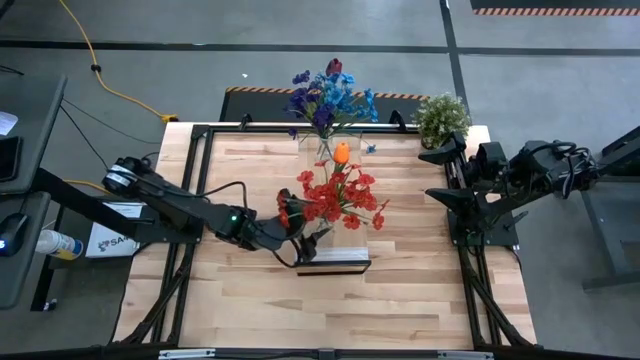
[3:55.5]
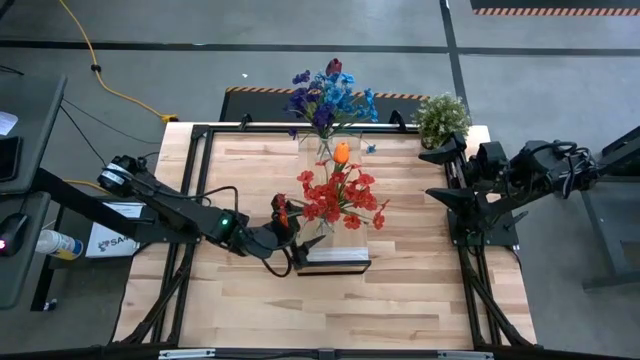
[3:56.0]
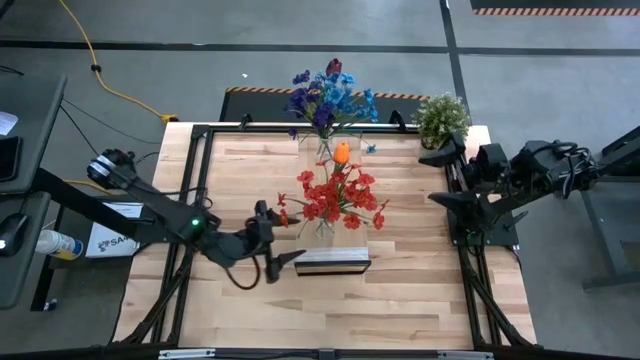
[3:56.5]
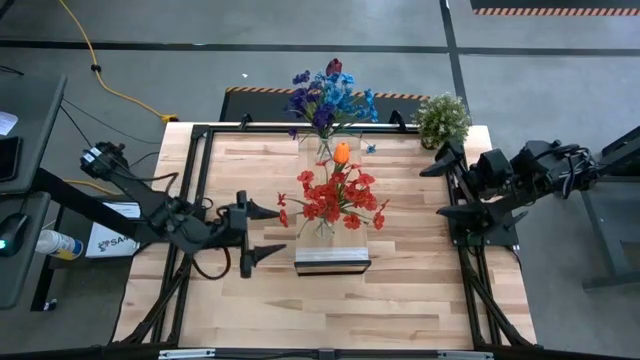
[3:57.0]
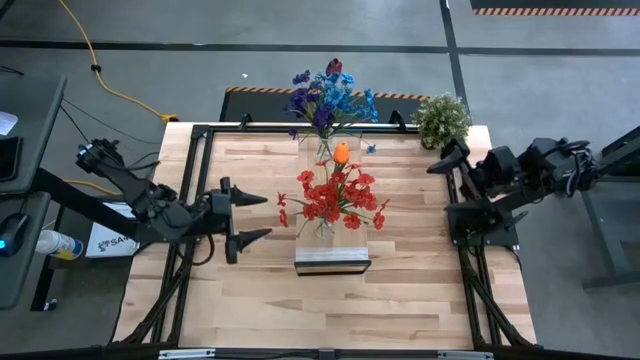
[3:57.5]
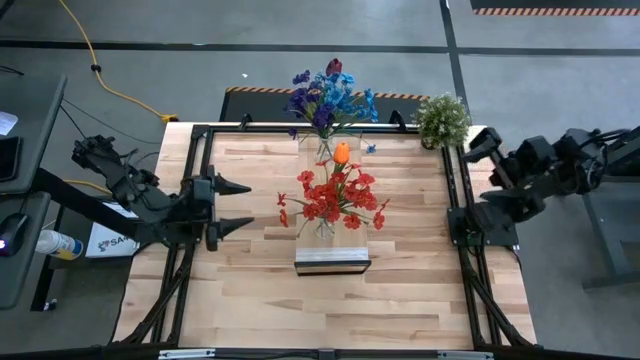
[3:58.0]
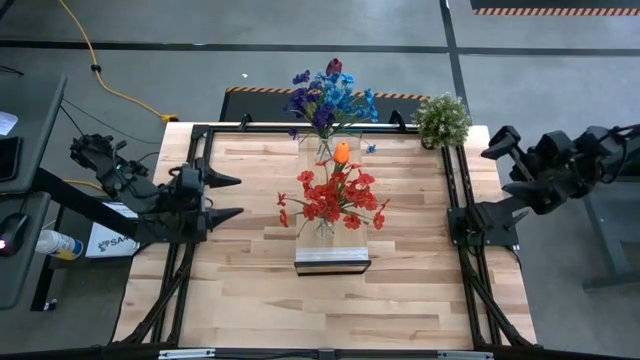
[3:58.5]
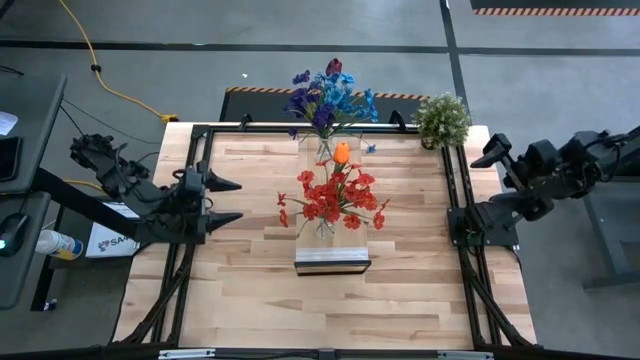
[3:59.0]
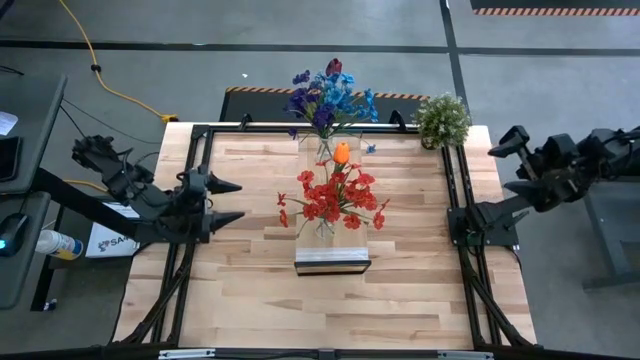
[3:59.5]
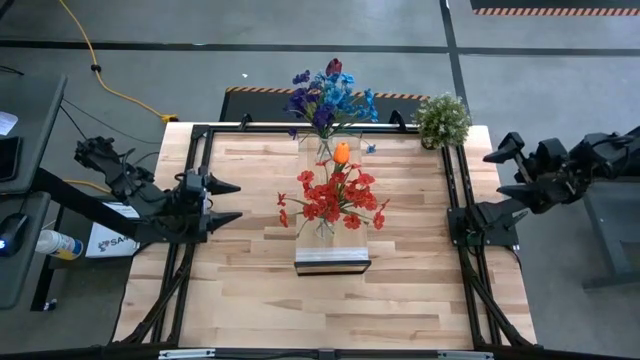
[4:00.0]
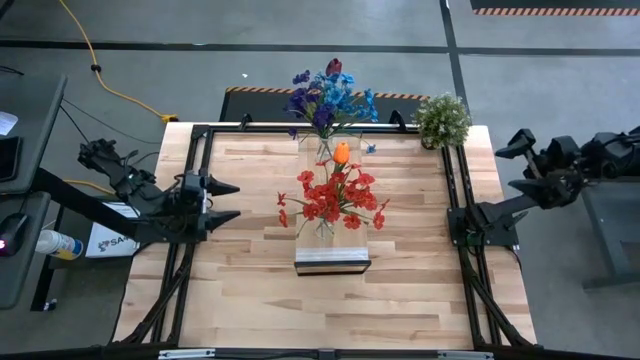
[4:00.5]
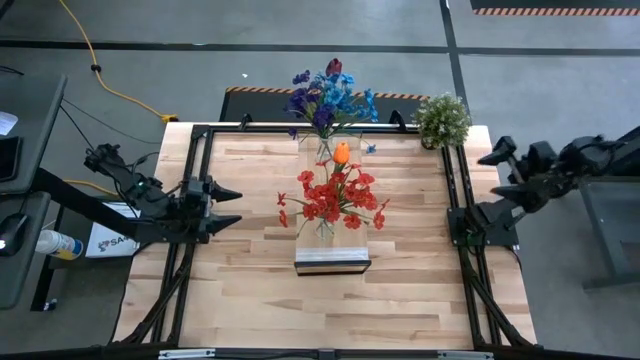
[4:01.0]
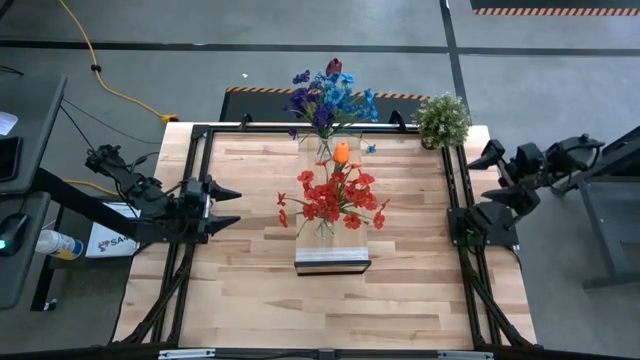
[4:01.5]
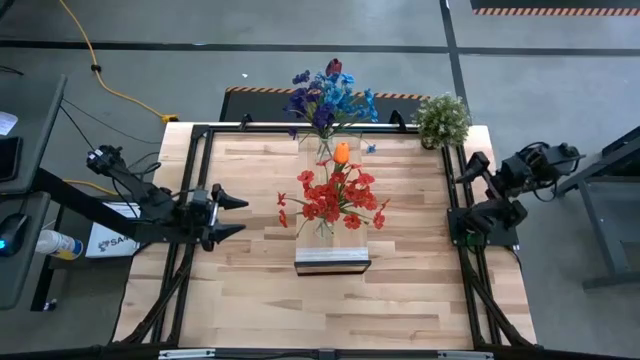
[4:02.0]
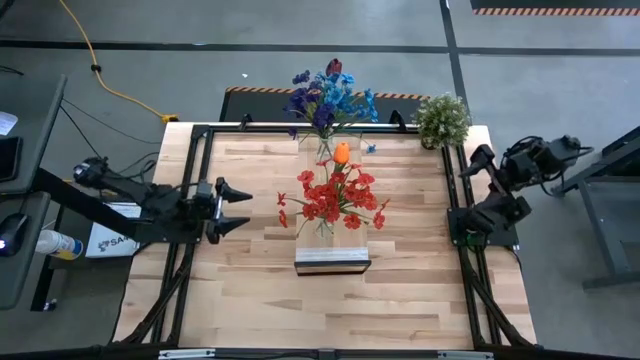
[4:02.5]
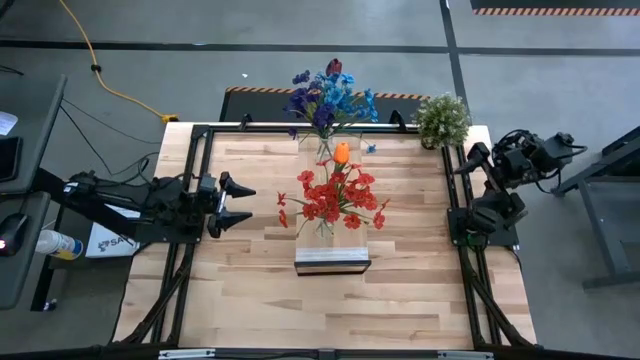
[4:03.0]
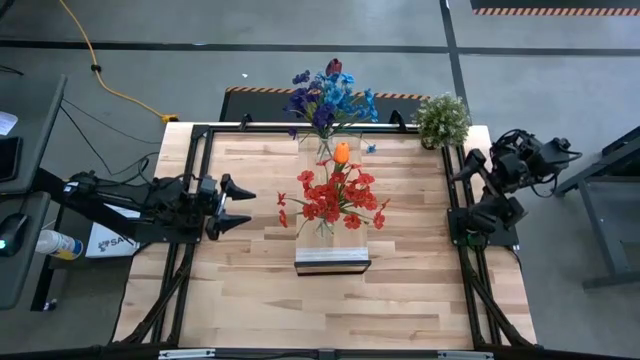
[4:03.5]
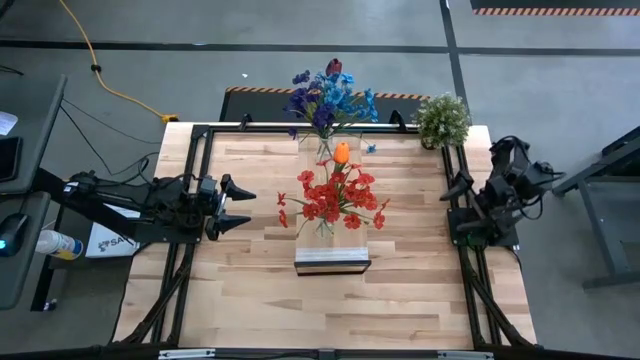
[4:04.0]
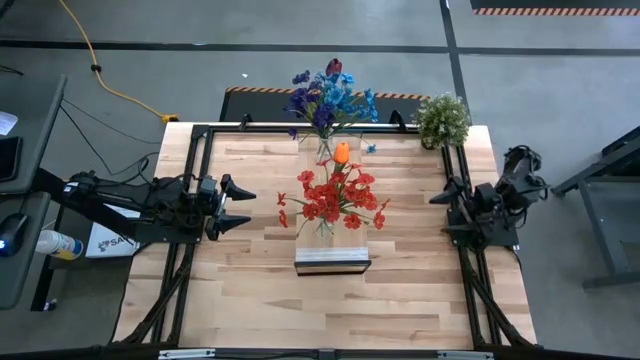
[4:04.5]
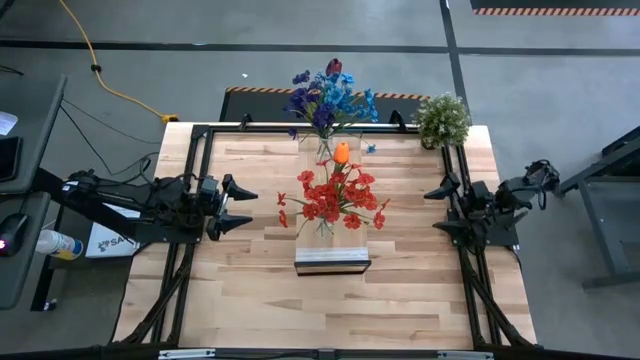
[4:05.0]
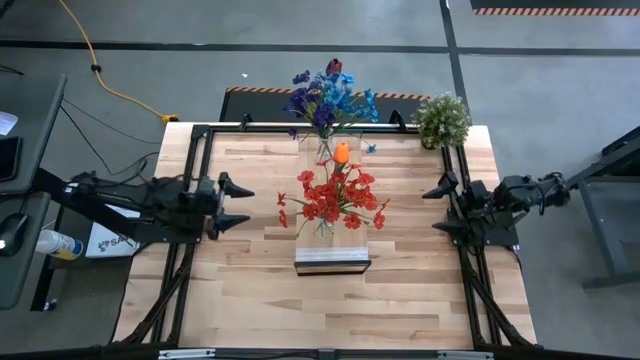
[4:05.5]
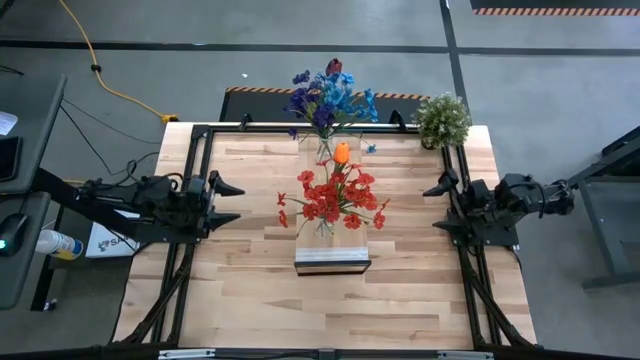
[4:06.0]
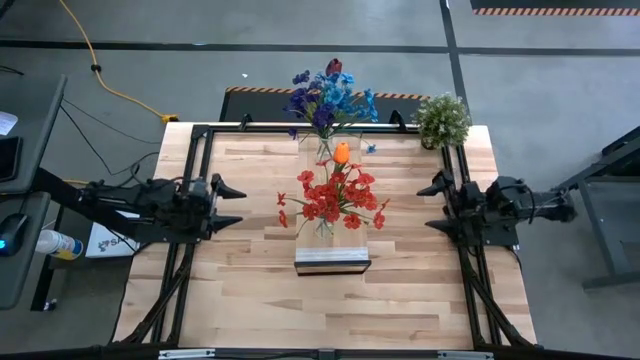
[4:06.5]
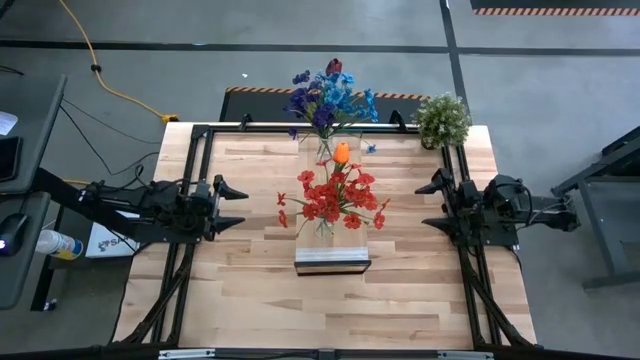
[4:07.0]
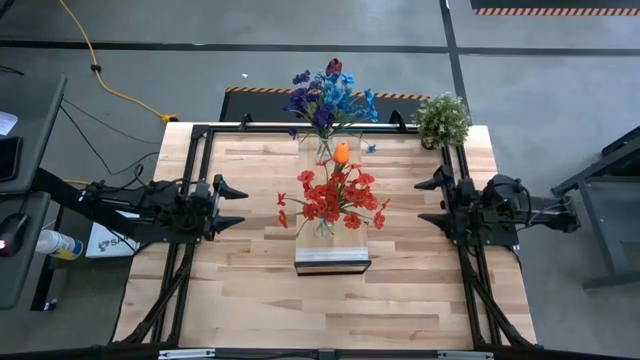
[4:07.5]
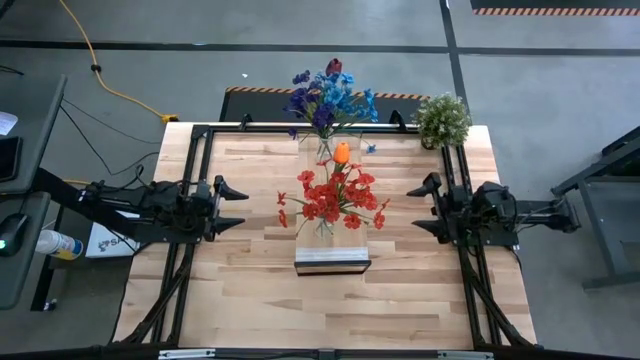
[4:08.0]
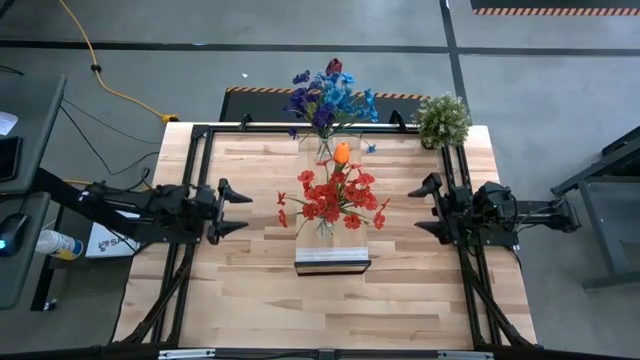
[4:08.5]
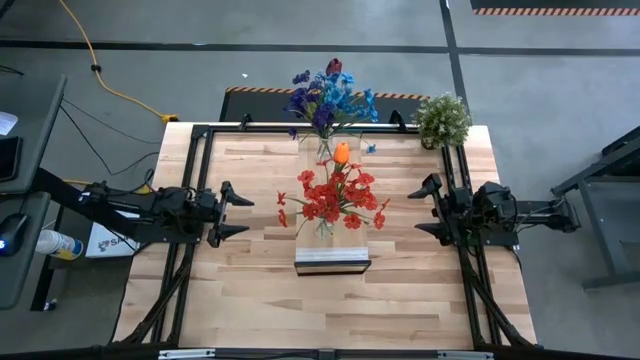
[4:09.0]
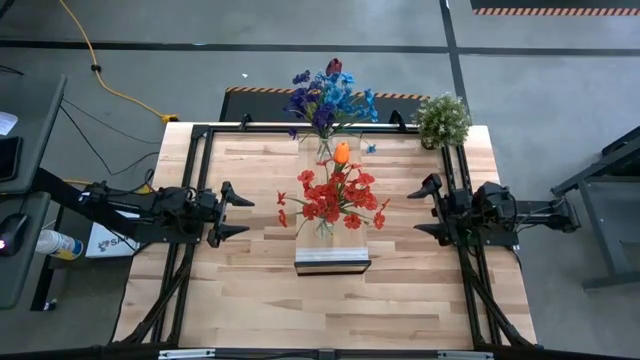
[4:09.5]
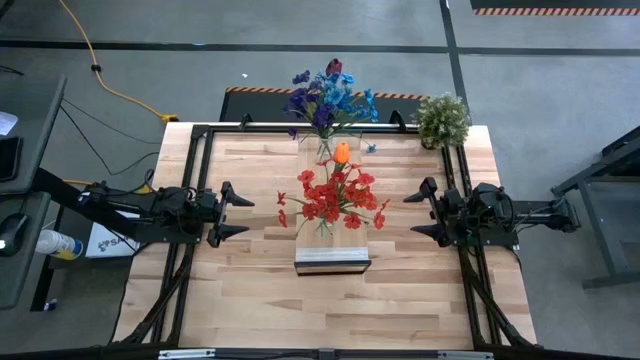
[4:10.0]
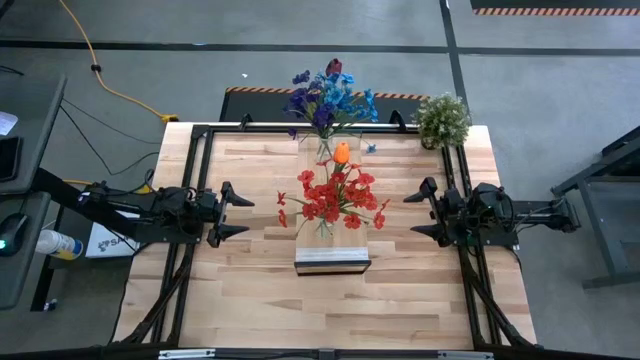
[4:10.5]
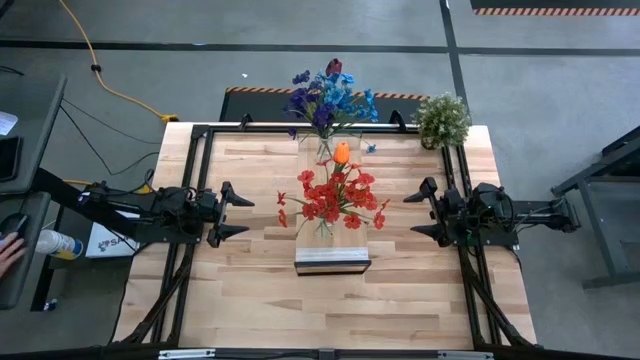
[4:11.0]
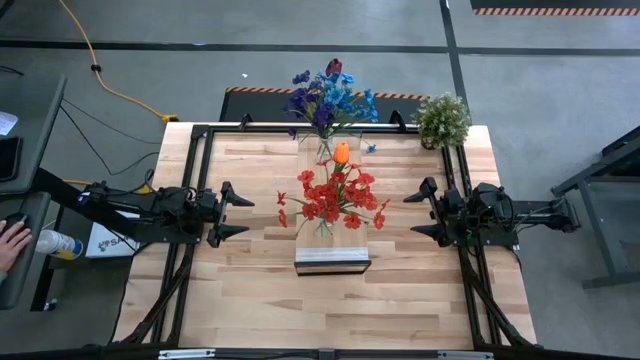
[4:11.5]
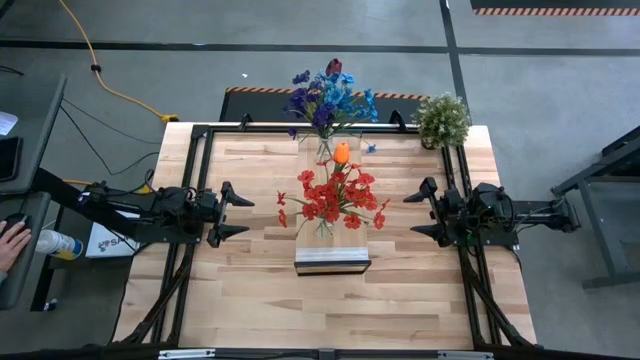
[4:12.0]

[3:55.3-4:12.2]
Task: Pick and place flowers into a vace then onto a shelf
Return to Home Position

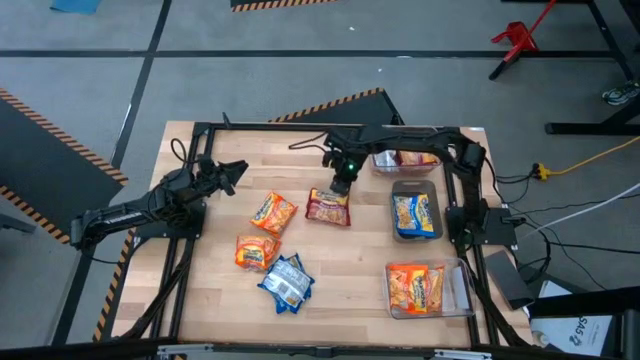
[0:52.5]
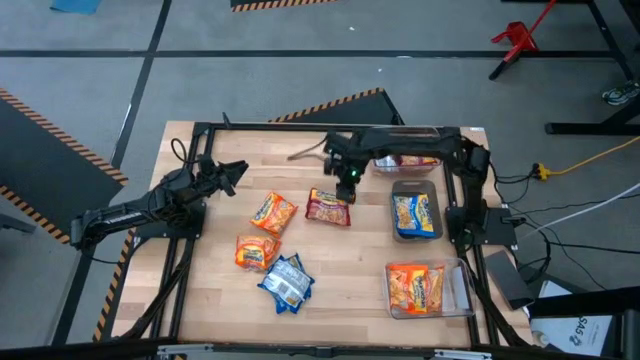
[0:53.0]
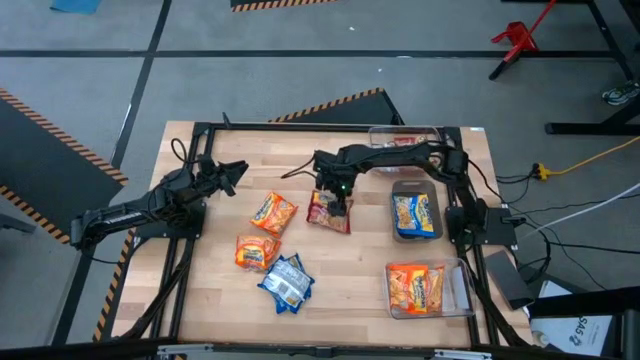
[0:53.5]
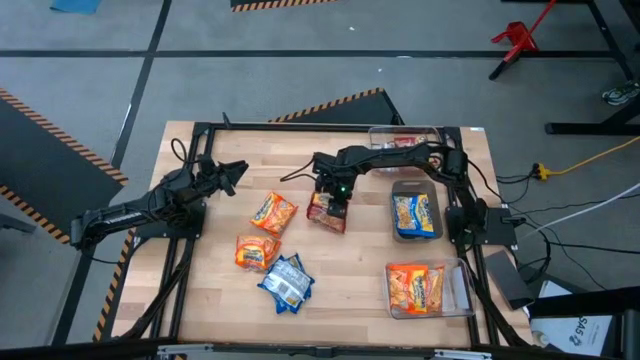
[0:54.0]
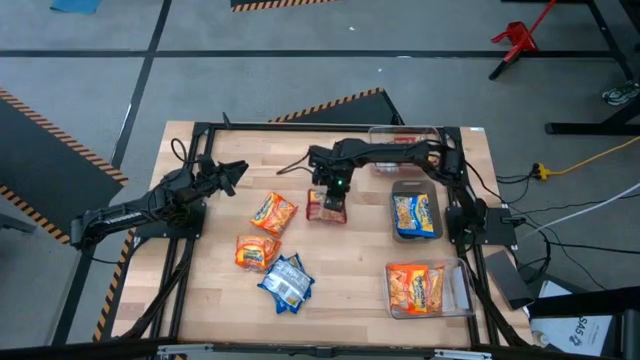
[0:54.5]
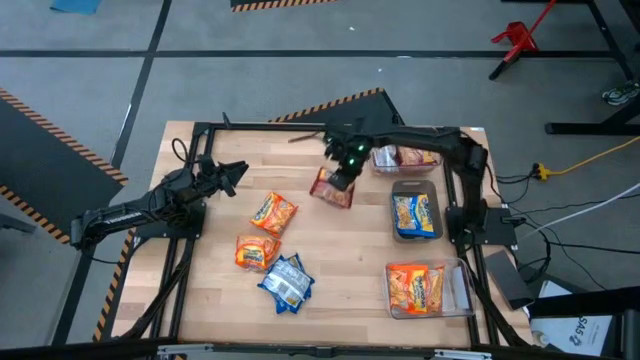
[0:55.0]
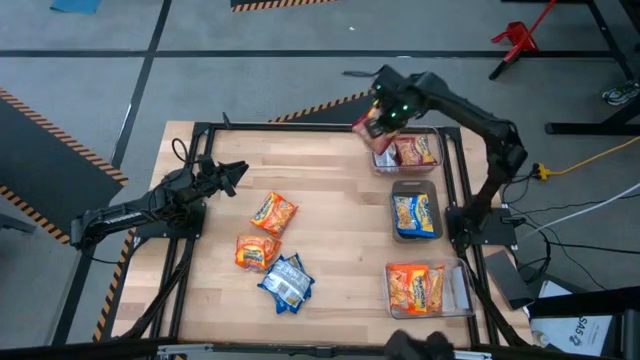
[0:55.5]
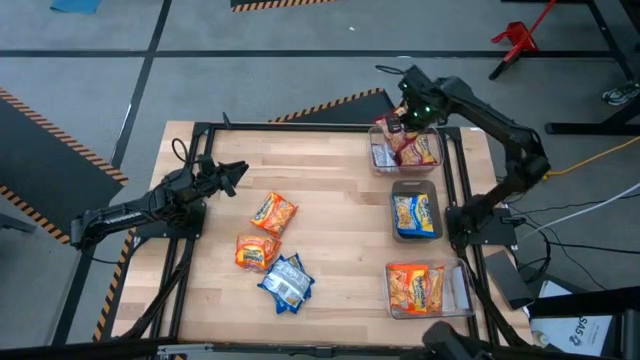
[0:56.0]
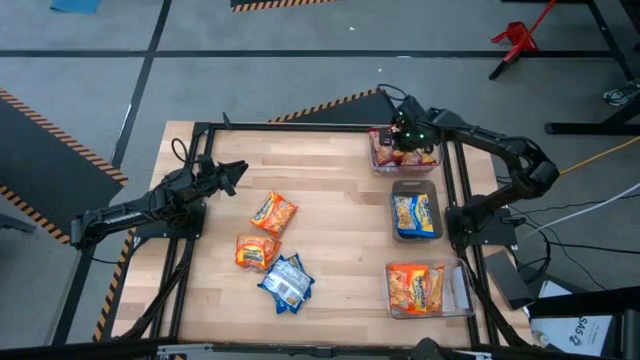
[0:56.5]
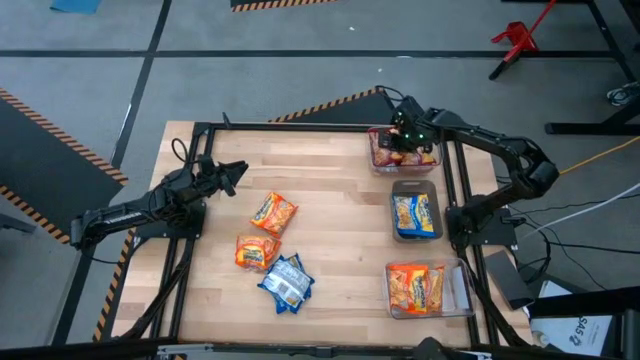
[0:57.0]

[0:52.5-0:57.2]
Task: Sort Maruchan noodles
Put the red noodle pack into the top transparent bin
